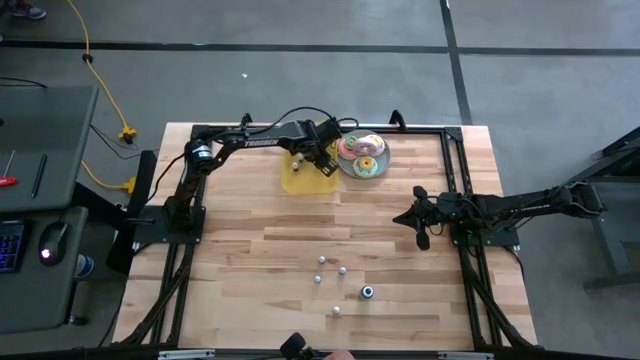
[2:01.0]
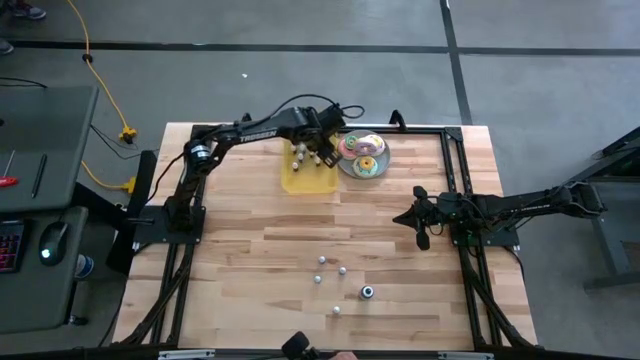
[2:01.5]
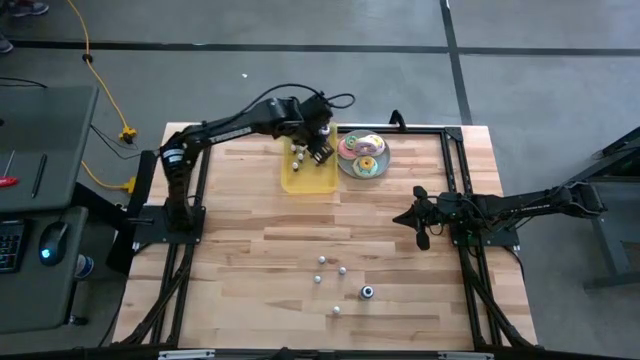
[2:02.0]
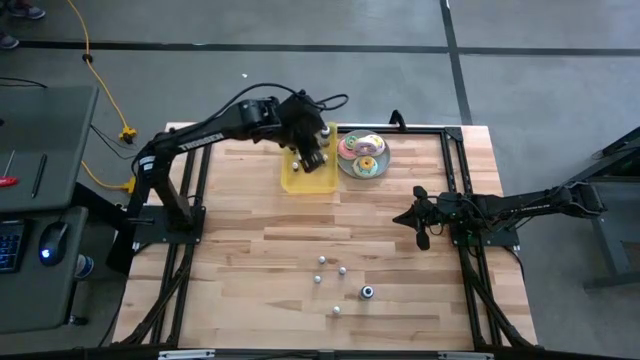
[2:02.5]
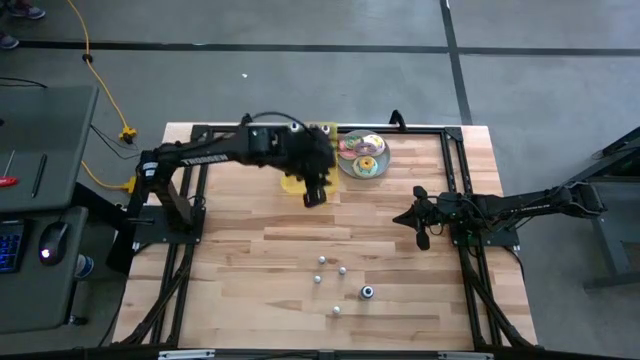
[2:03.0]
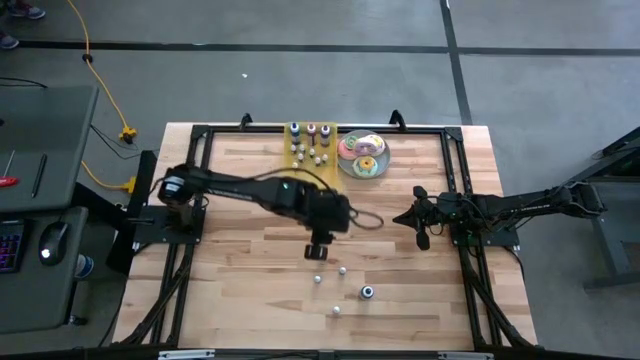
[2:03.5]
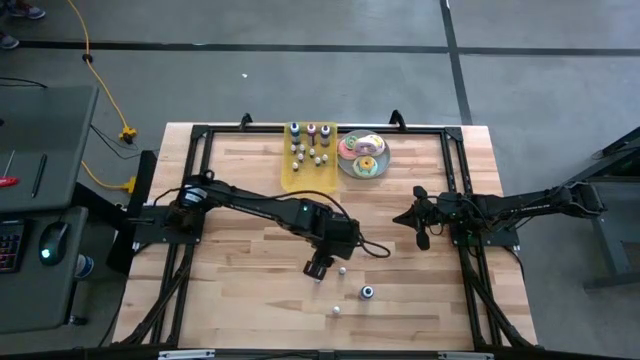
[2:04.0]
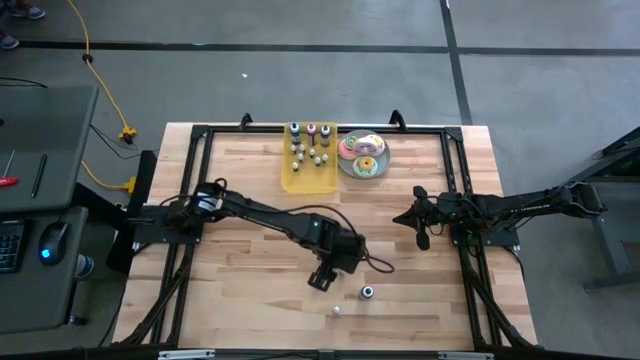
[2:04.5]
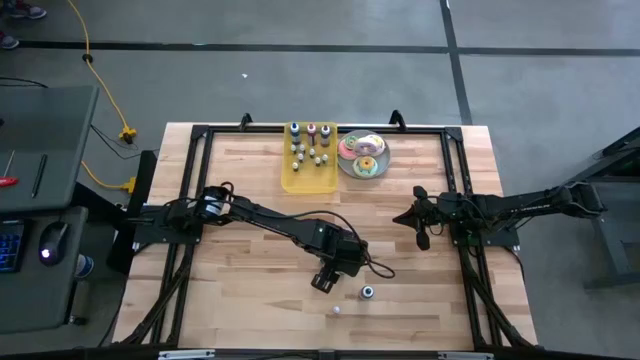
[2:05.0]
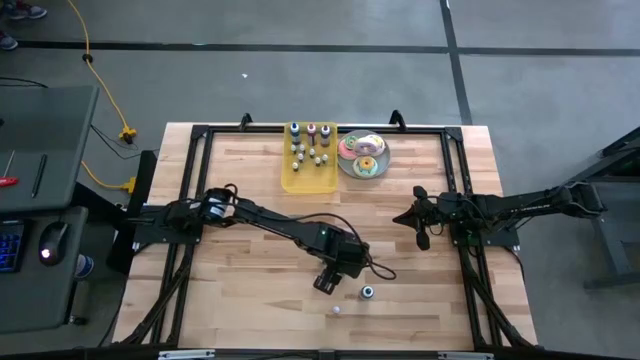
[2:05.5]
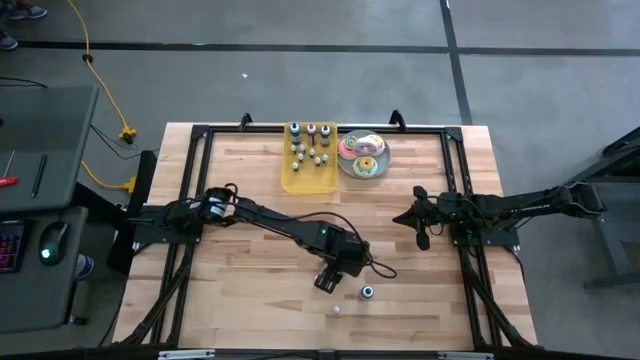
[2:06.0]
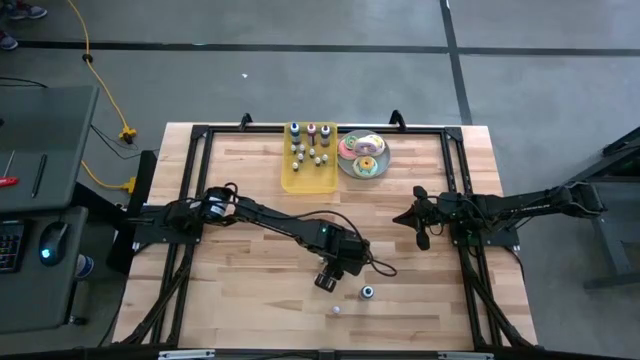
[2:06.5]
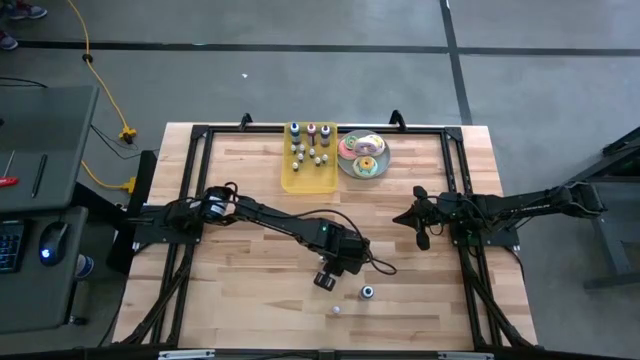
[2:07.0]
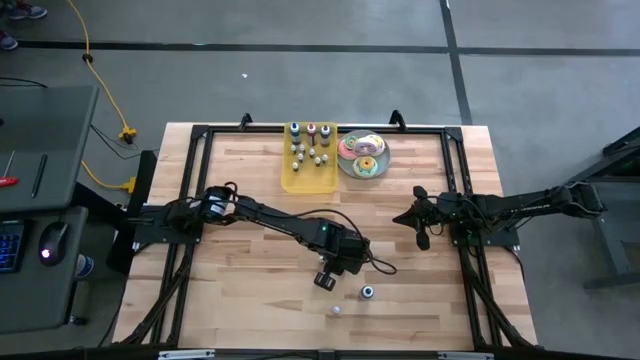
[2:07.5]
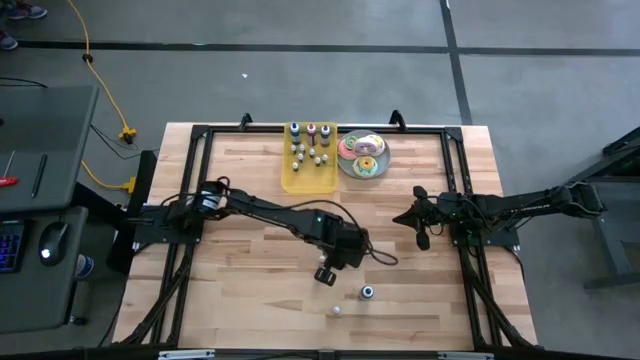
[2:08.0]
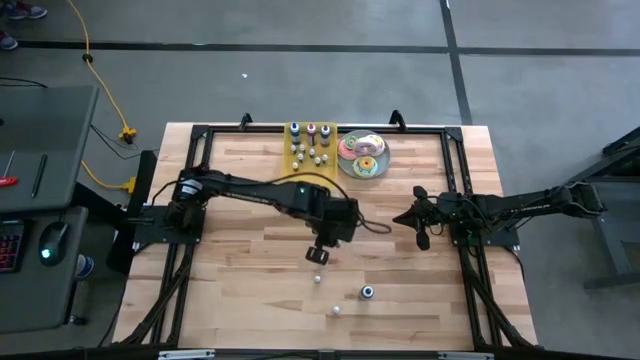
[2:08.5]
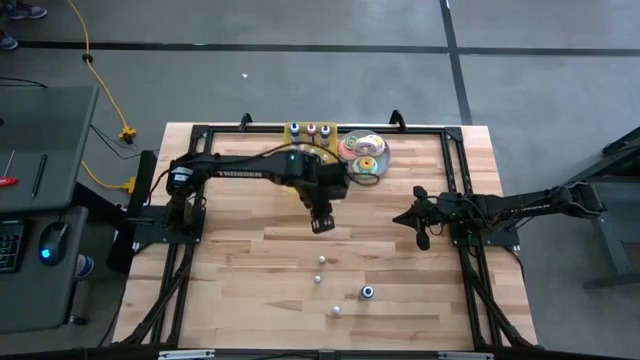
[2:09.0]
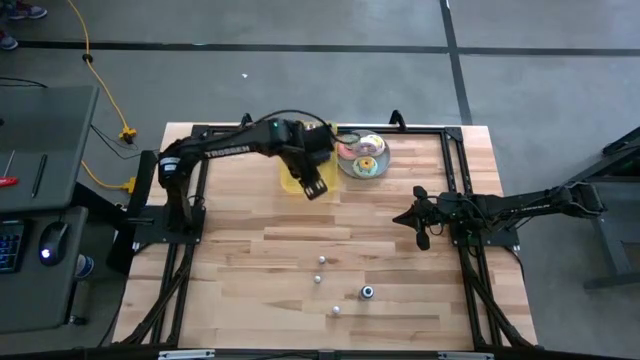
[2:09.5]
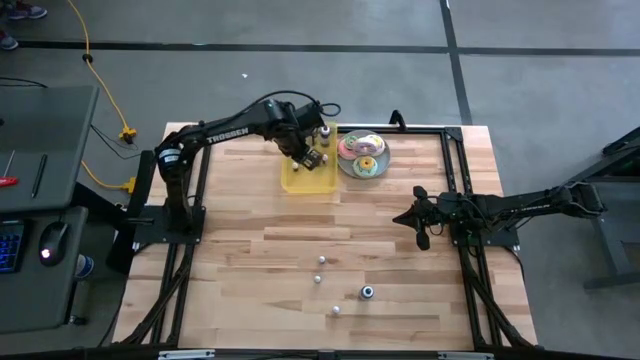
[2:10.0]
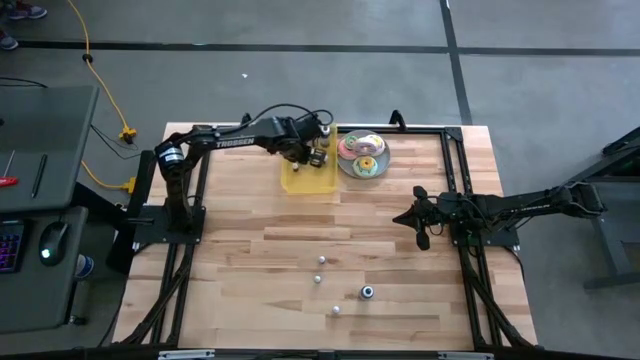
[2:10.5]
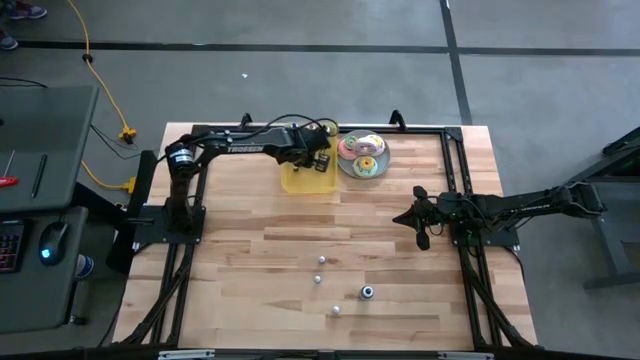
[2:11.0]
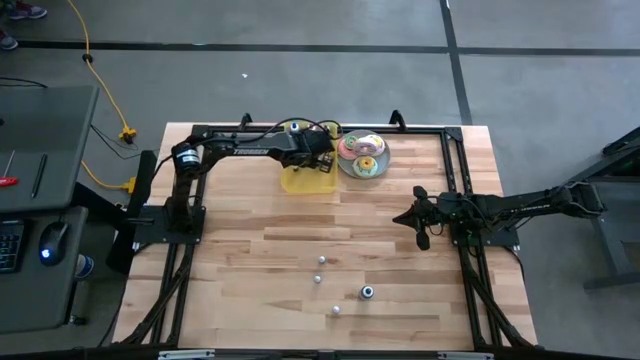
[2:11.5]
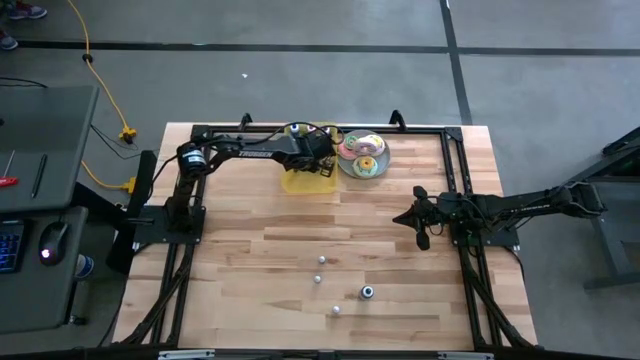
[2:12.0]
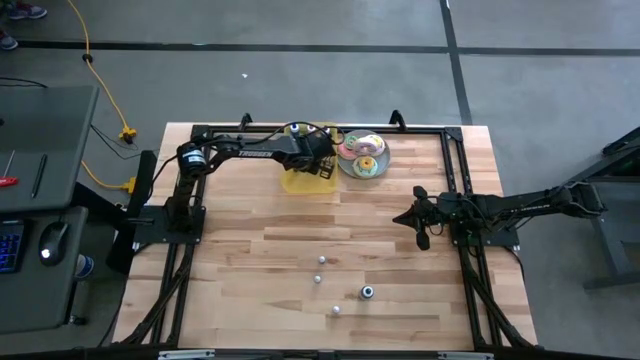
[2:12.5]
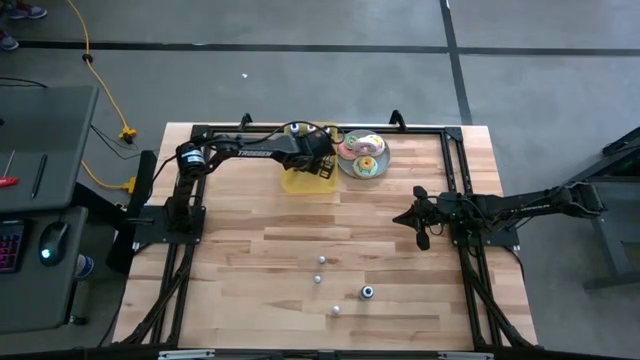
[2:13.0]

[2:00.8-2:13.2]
Task: Pick & Place food coloring
Put the small brown food coloring bottle into the bin

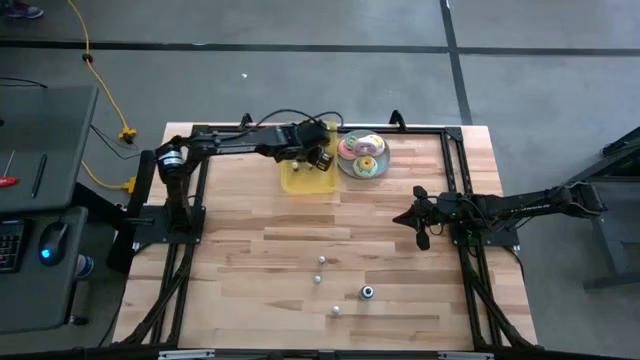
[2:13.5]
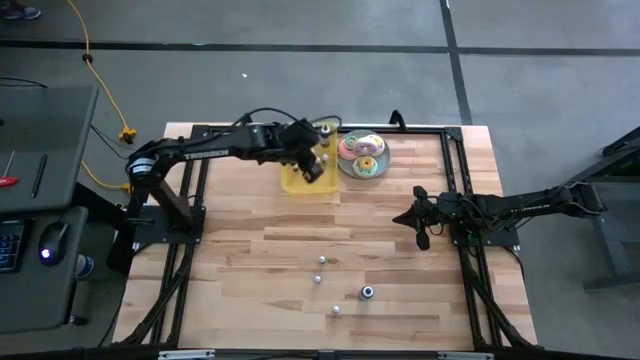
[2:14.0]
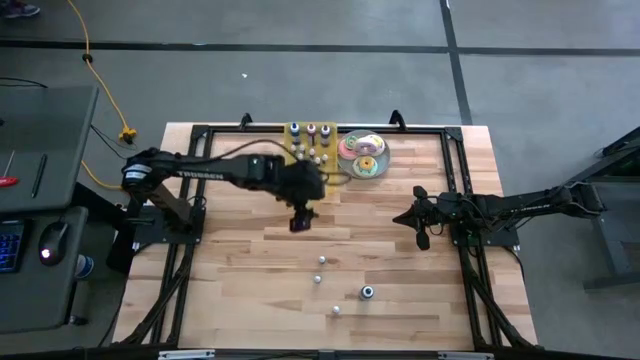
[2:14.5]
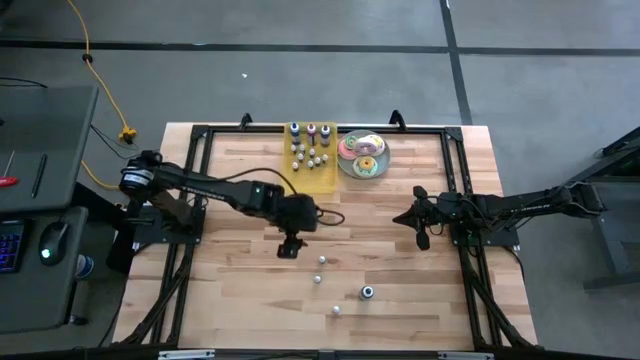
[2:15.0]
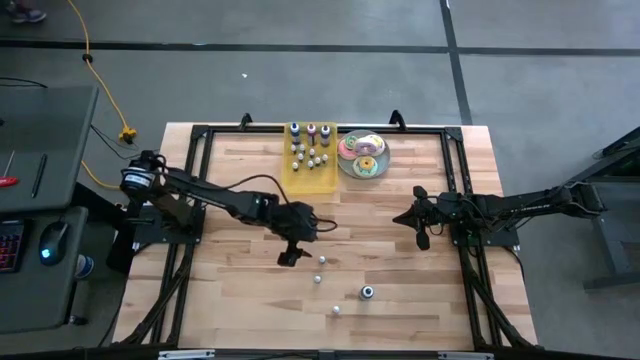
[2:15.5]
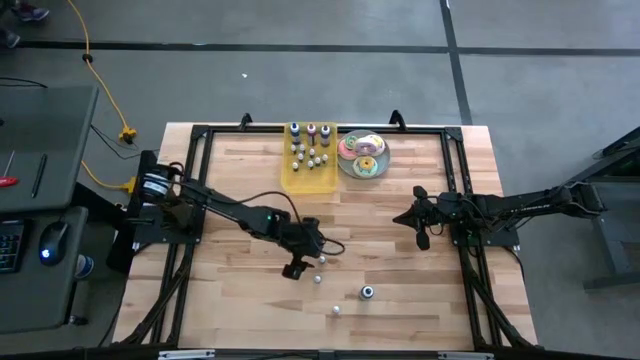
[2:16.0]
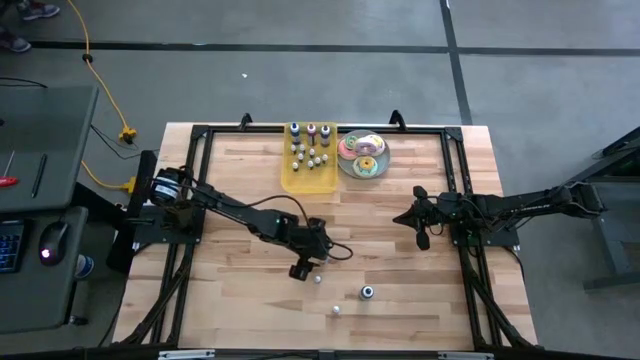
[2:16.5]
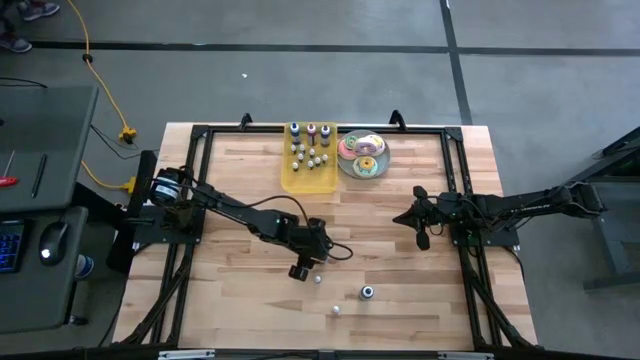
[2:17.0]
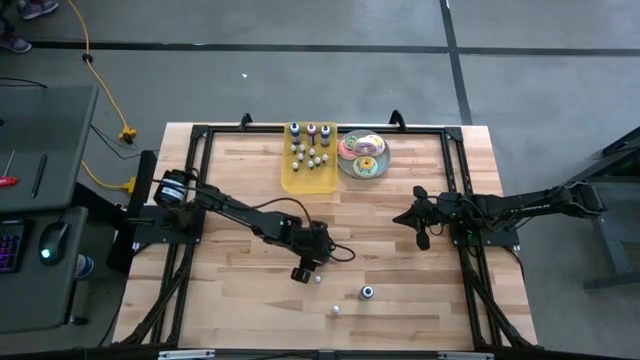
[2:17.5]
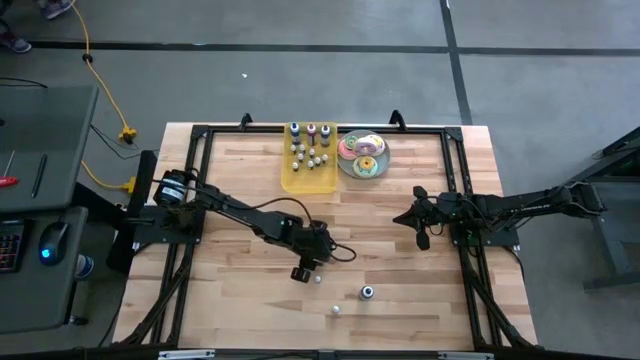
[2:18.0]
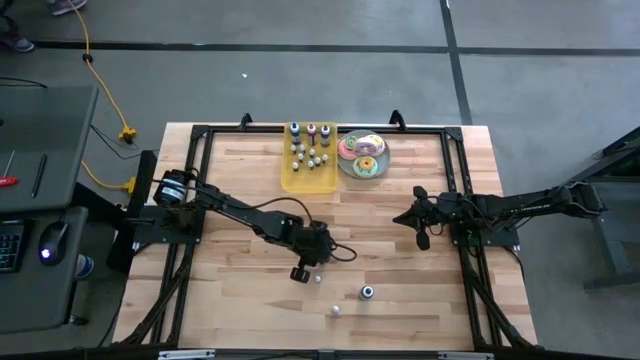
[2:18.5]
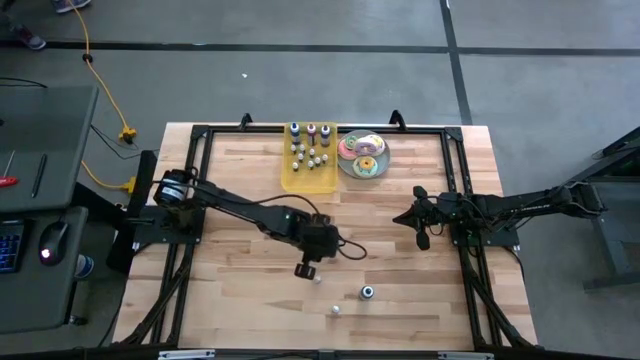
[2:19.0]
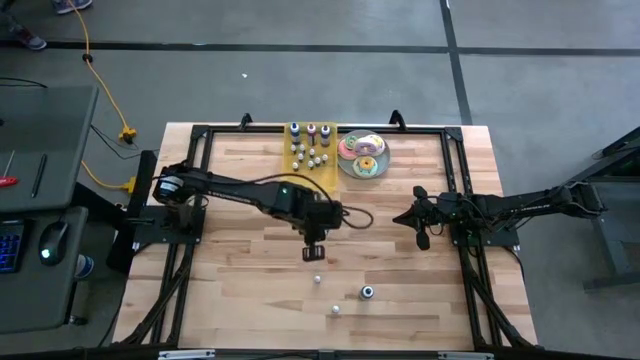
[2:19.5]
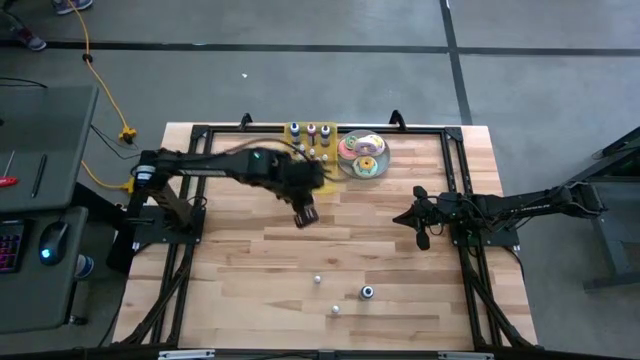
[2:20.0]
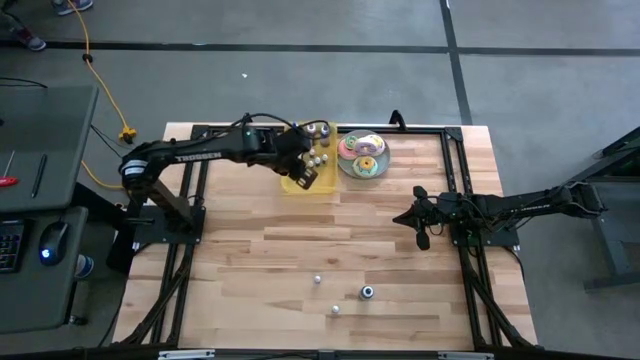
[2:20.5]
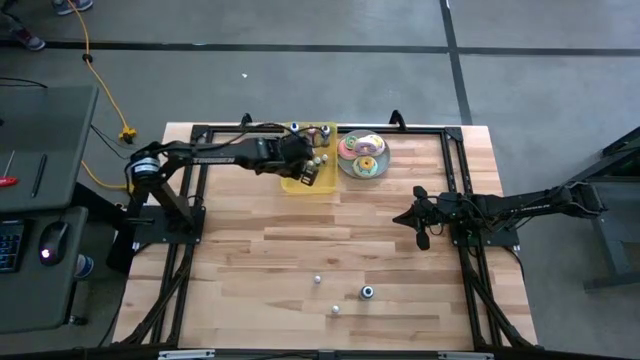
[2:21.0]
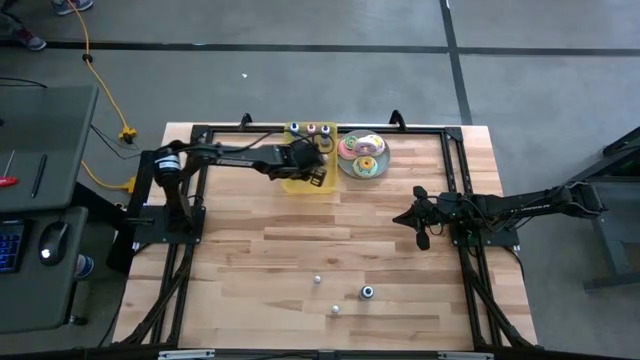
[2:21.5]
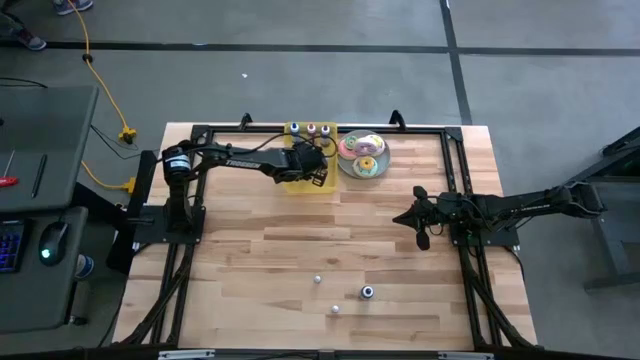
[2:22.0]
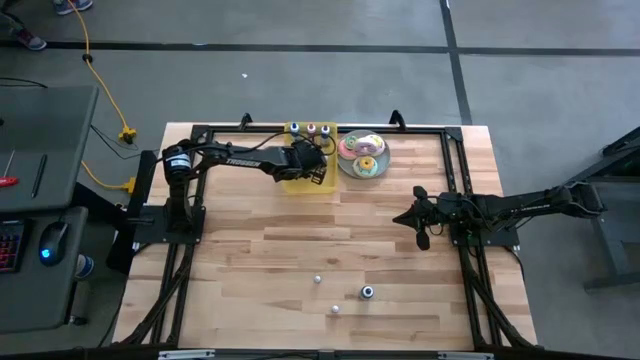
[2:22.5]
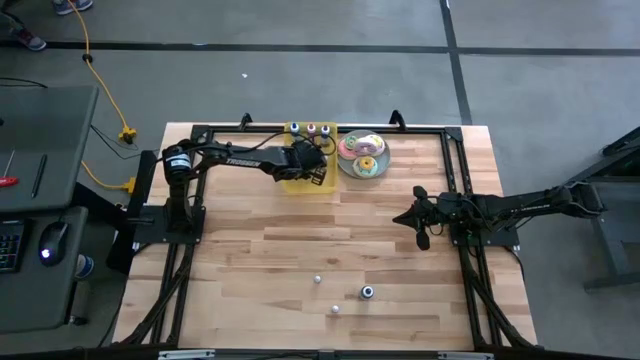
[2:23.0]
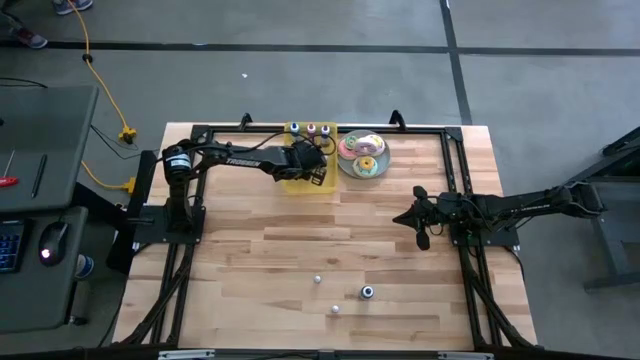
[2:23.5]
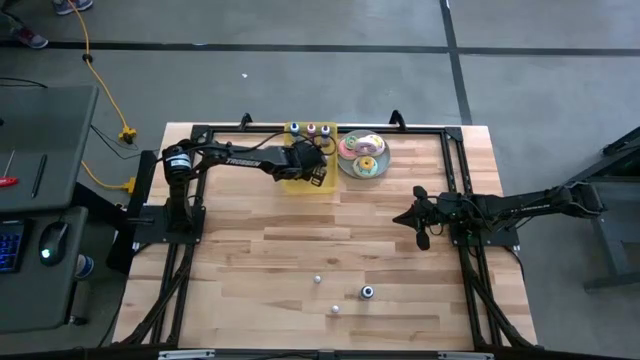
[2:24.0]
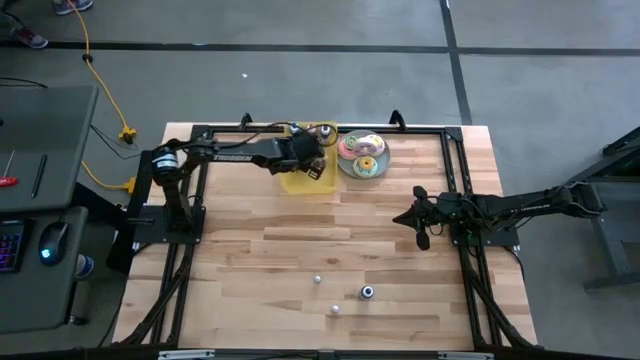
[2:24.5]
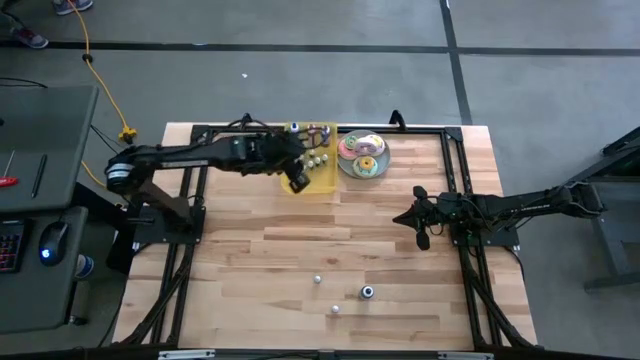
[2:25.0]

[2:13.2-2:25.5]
Put the small orange food coloring bottle into the bin
